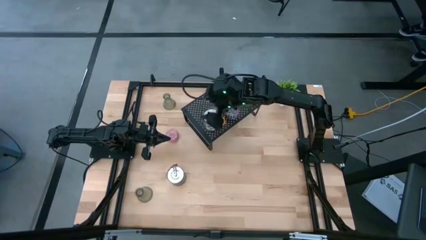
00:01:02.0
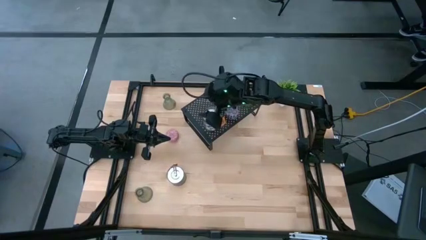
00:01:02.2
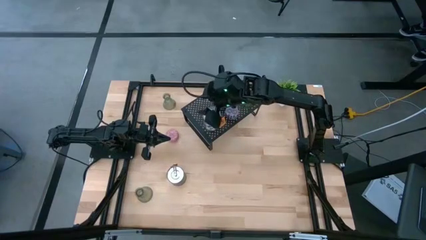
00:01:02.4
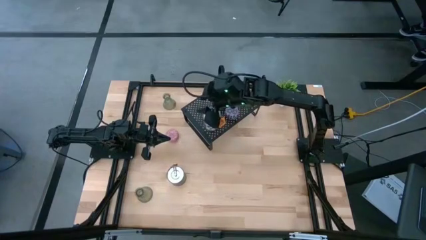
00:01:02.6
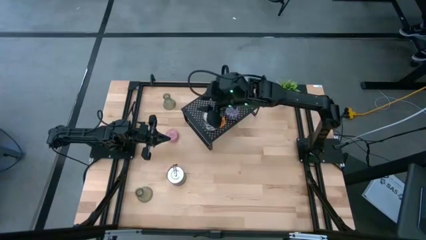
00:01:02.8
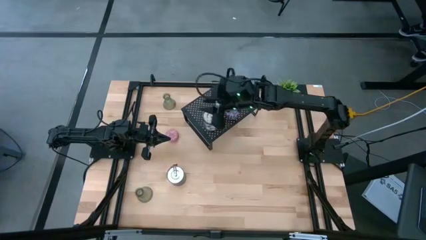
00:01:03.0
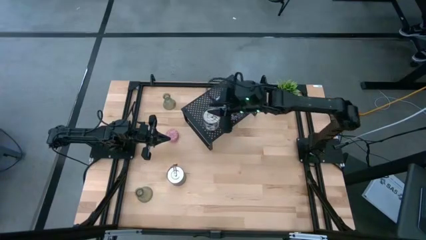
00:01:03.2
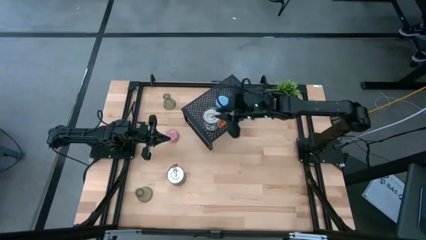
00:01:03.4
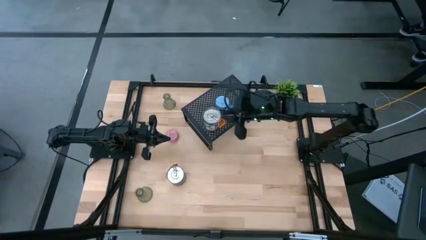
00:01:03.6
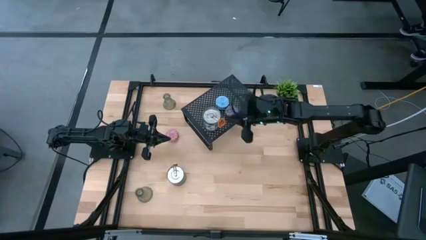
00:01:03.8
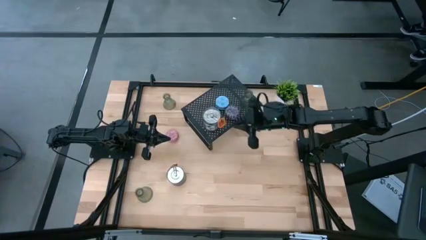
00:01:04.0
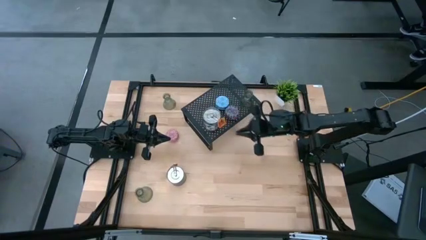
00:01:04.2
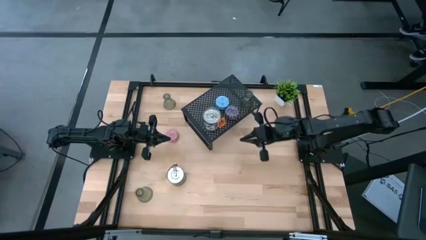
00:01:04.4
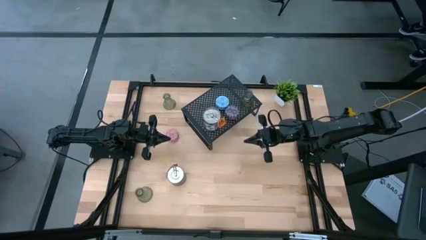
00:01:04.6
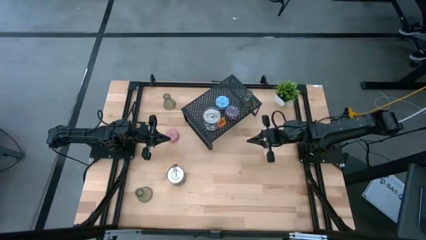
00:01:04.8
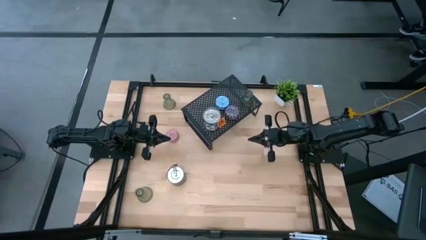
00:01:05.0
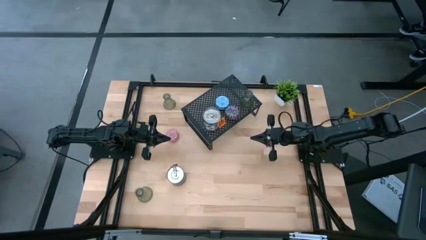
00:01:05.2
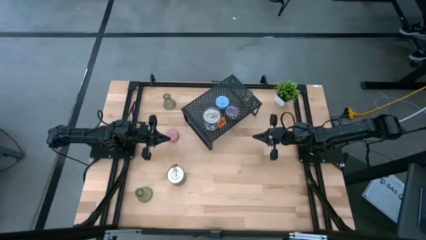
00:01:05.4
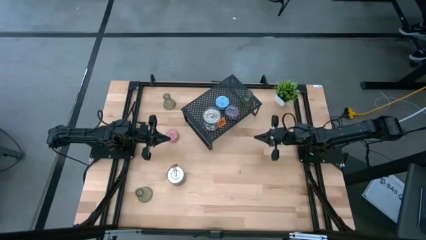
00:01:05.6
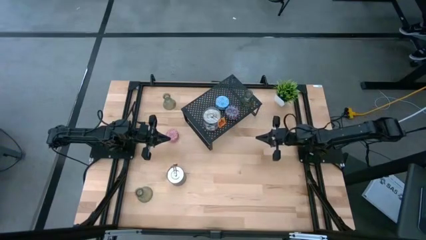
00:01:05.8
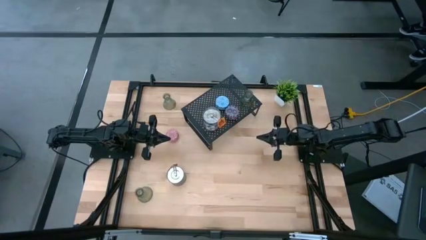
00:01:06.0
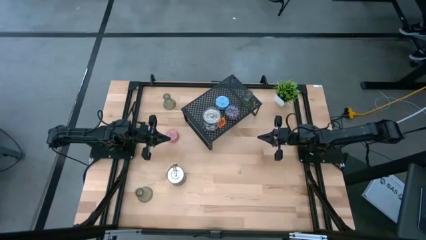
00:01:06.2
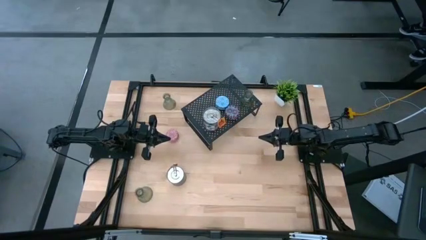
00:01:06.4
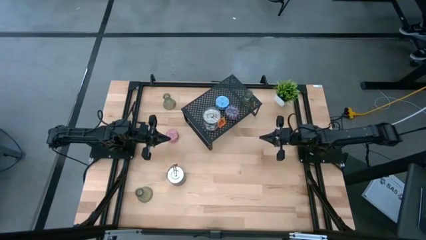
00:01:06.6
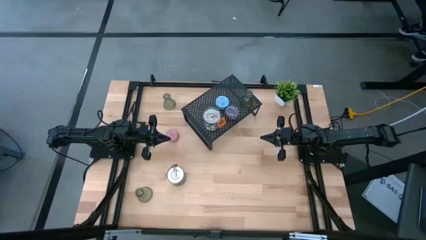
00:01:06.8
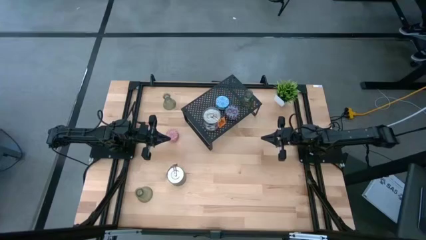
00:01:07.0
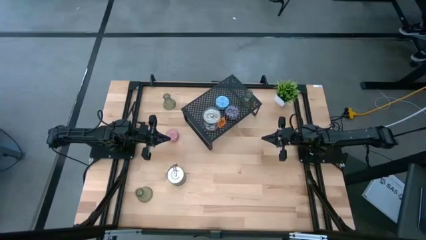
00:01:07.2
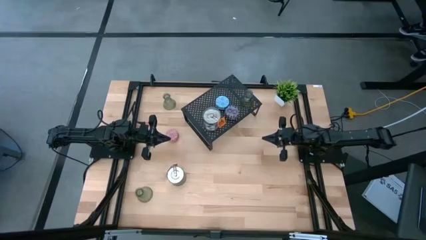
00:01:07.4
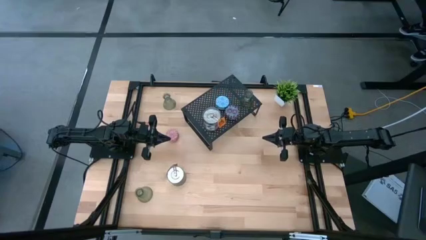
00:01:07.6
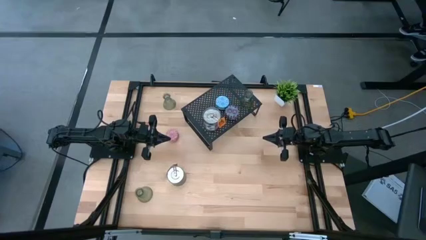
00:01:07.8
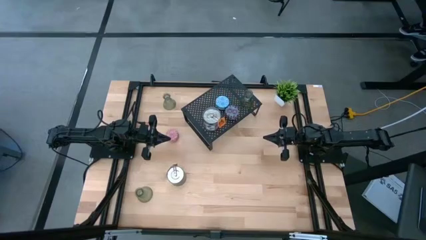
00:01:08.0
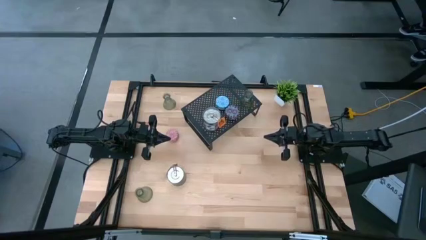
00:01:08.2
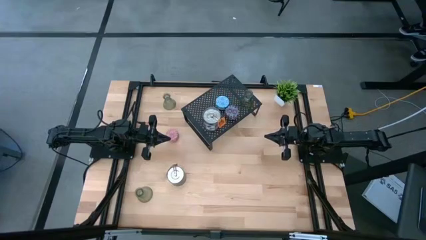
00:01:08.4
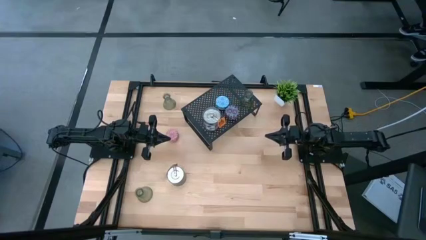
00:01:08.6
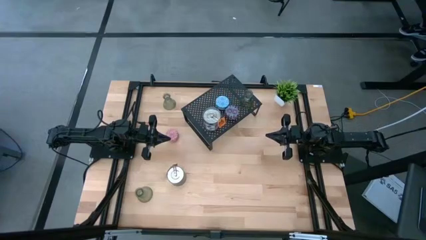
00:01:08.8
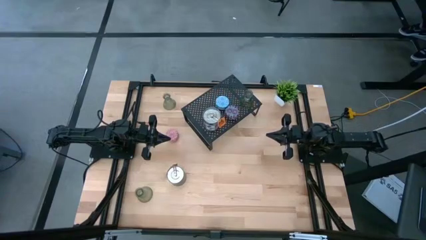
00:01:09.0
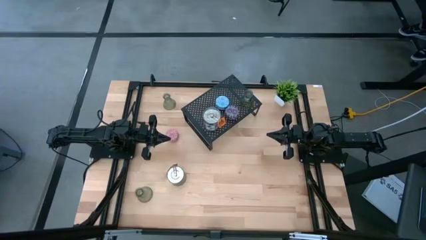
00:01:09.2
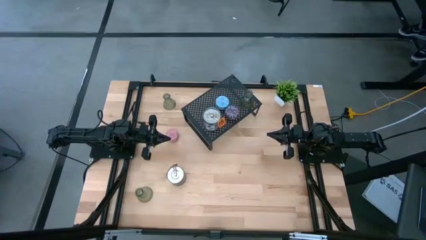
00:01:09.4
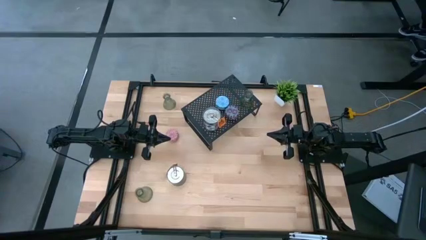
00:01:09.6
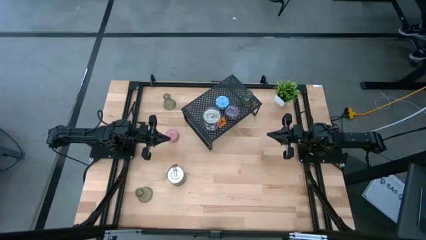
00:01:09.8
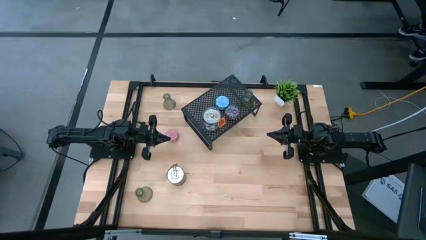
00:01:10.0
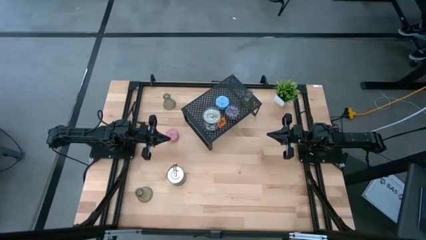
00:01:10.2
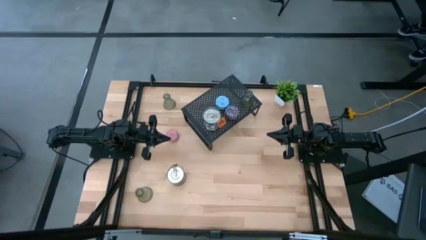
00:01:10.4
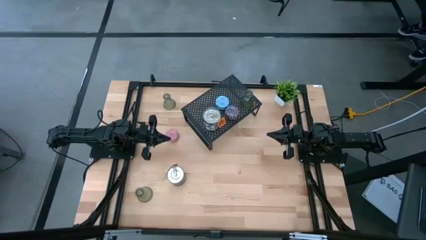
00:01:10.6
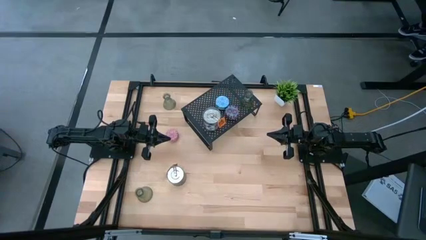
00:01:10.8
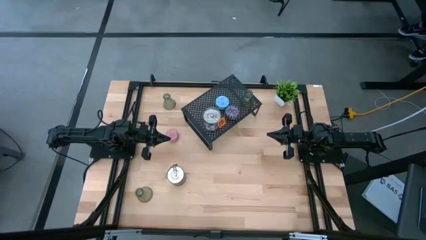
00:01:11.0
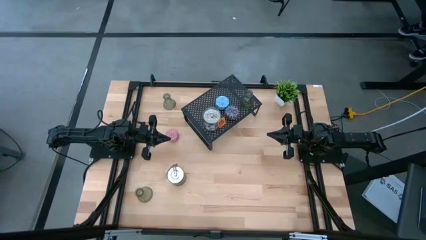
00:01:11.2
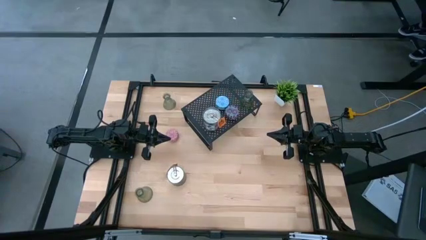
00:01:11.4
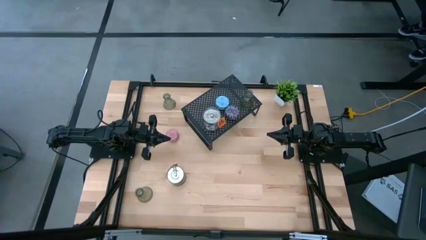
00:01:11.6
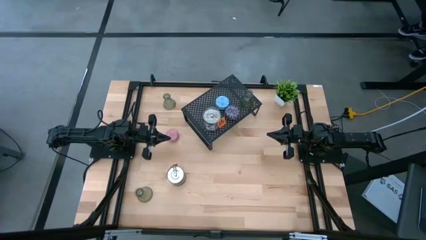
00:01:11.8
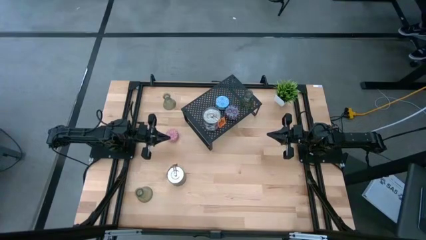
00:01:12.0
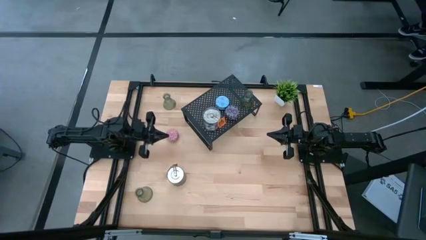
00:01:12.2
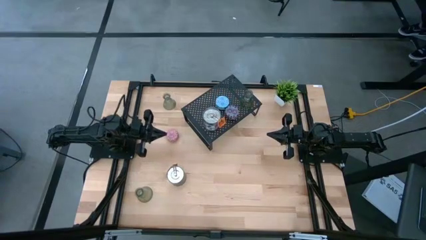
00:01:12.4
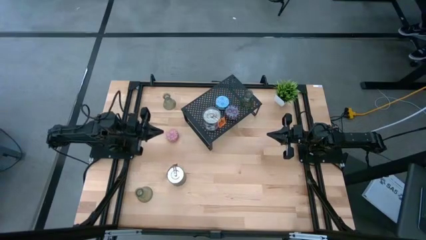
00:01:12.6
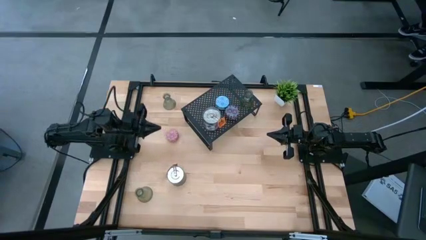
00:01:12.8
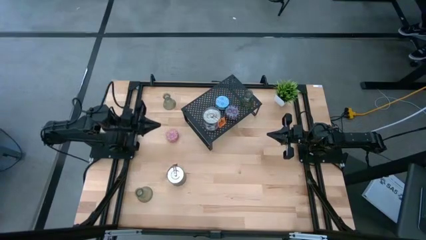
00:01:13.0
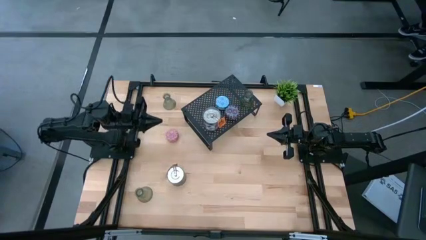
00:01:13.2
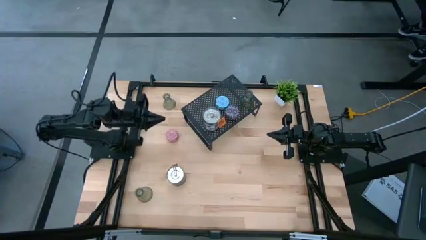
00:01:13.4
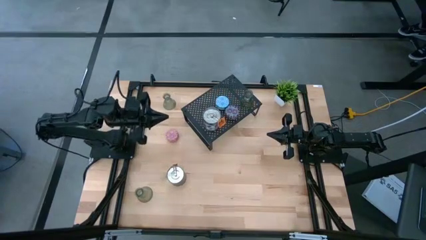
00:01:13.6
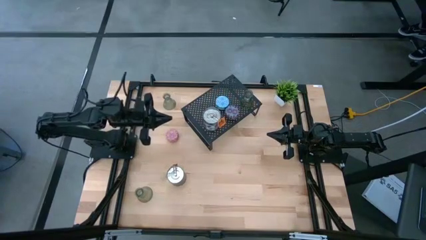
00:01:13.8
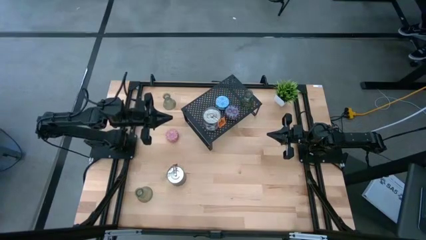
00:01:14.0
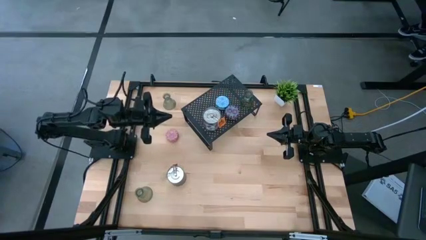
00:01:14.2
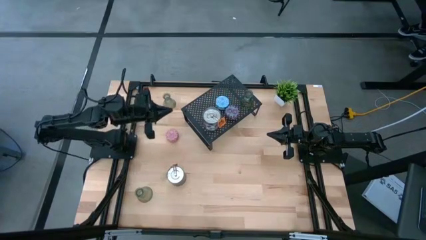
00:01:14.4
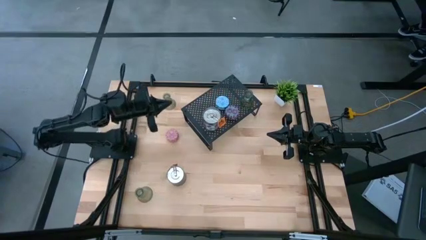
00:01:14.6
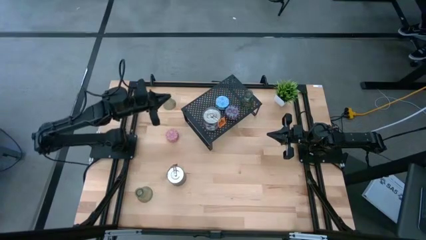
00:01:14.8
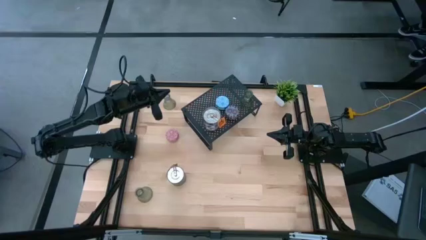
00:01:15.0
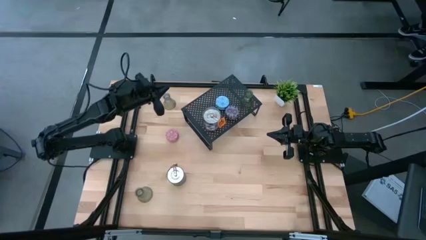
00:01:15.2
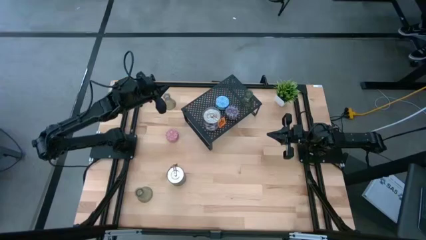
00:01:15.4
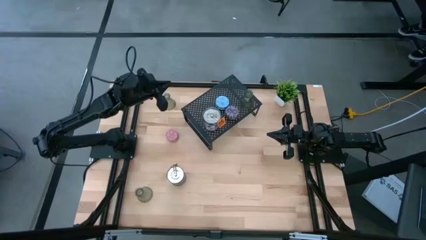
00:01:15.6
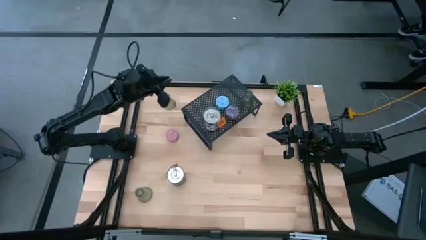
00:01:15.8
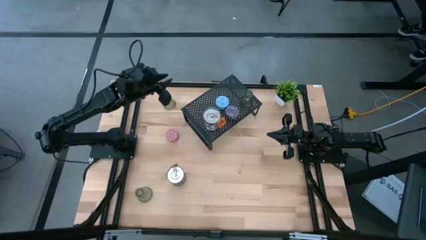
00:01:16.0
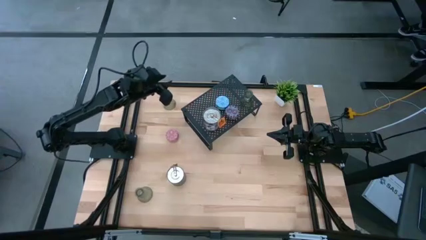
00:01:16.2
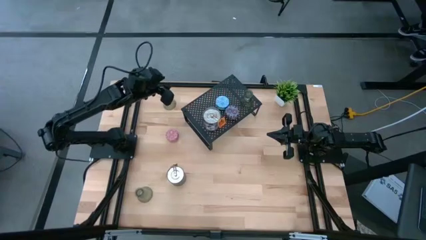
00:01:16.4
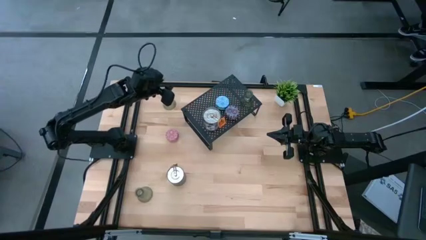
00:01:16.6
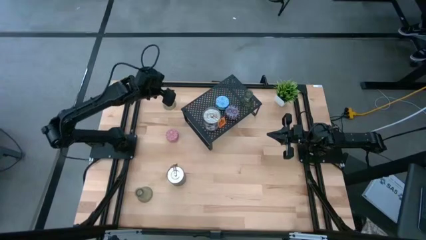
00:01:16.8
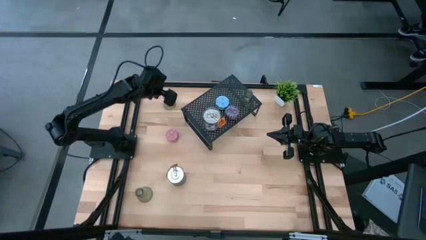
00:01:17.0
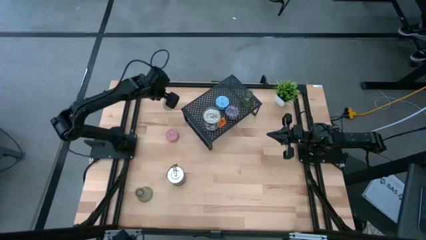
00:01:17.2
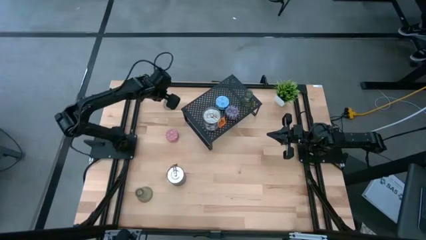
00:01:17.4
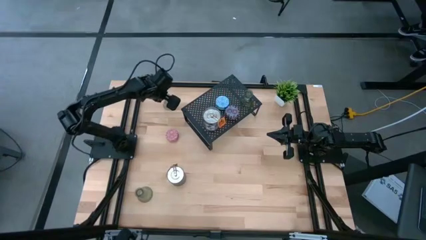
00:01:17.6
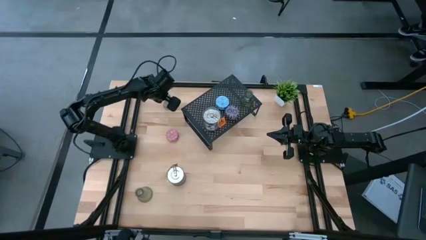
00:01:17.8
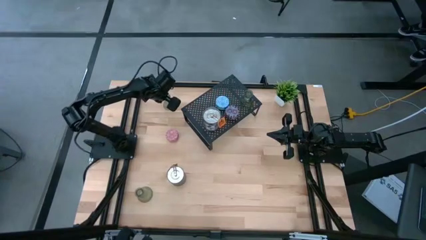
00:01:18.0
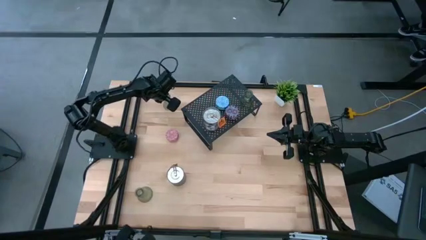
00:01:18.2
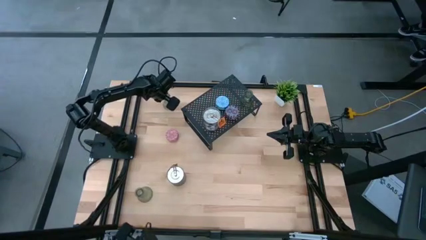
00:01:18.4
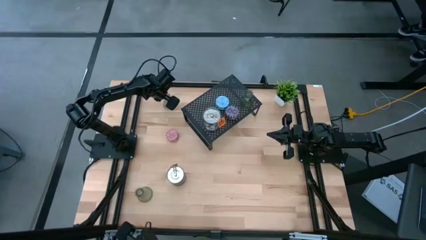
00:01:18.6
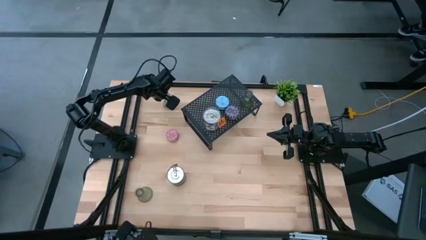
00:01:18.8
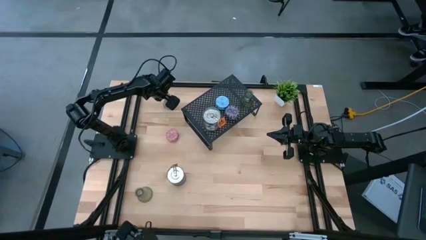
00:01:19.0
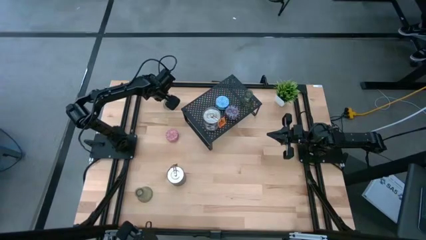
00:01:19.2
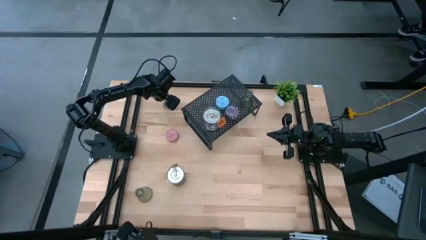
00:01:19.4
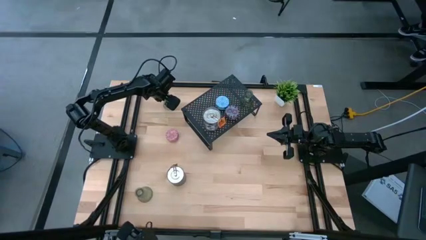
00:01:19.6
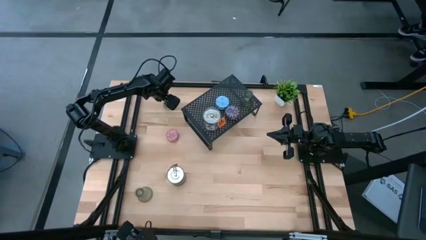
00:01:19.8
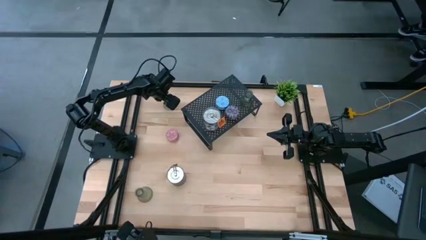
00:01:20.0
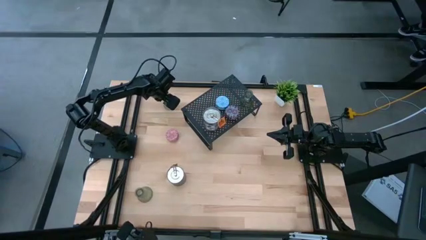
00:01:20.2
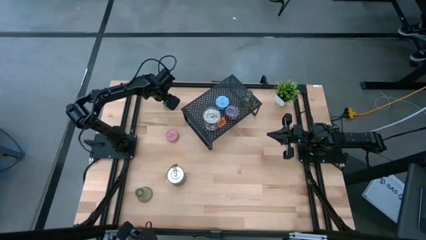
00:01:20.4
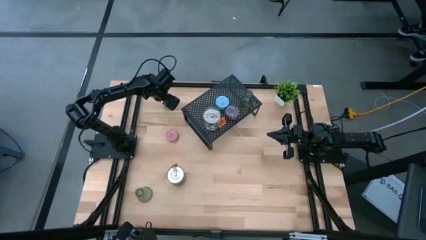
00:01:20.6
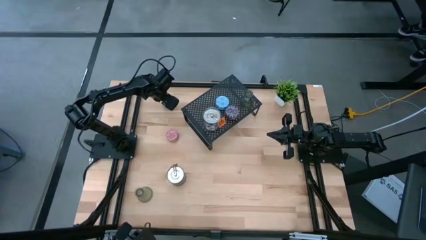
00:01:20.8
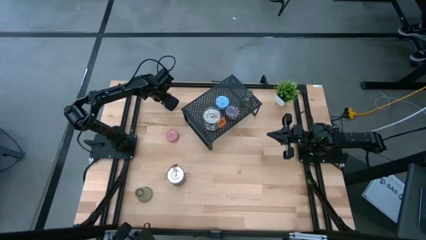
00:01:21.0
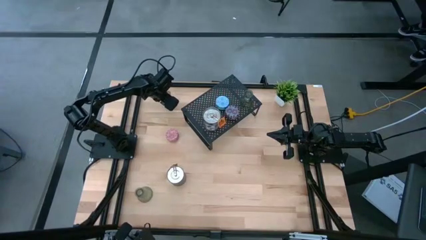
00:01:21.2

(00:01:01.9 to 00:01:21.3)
Task: Pick & Place candle stick holders
Put the top green glass candle holder on the shelf aligned with the green glass candle holder
